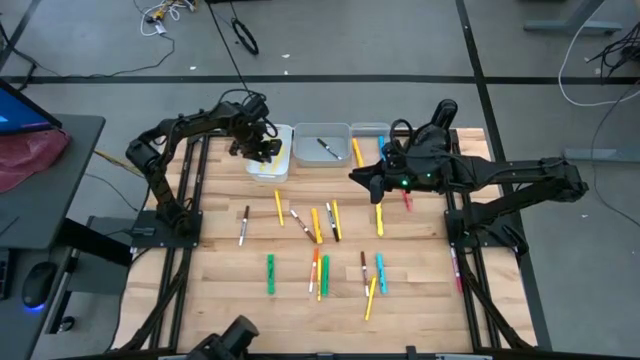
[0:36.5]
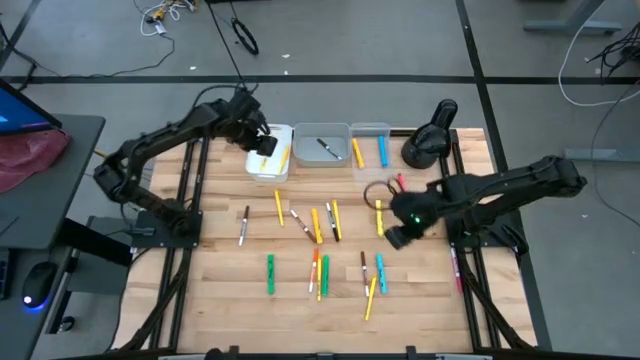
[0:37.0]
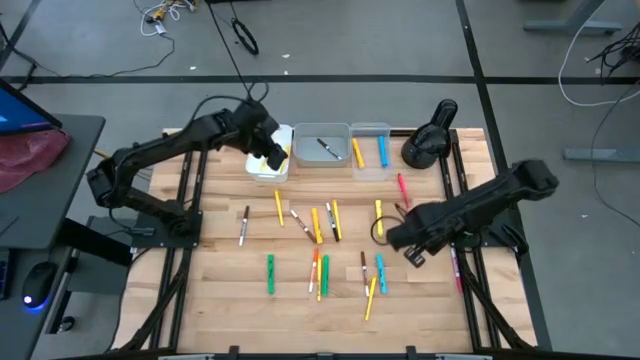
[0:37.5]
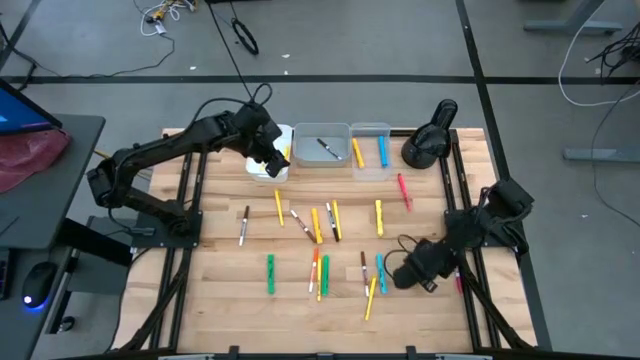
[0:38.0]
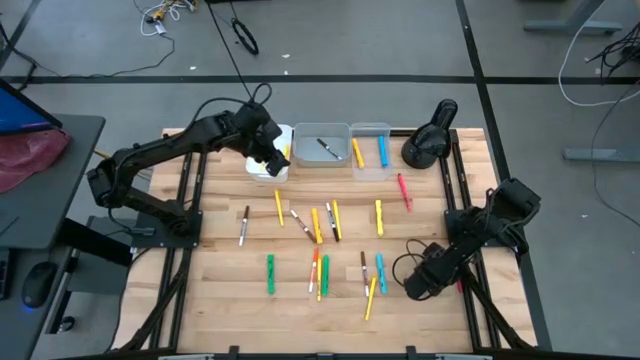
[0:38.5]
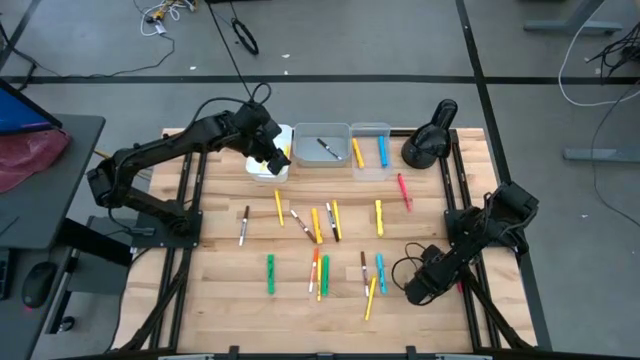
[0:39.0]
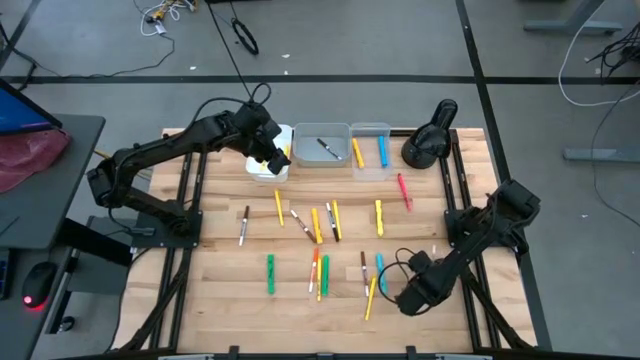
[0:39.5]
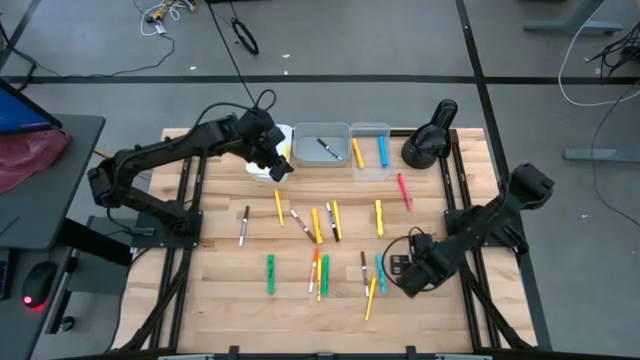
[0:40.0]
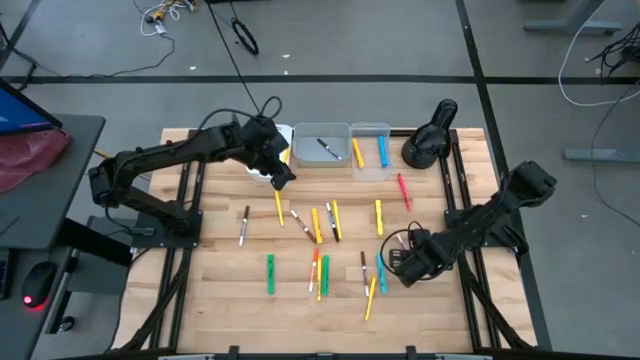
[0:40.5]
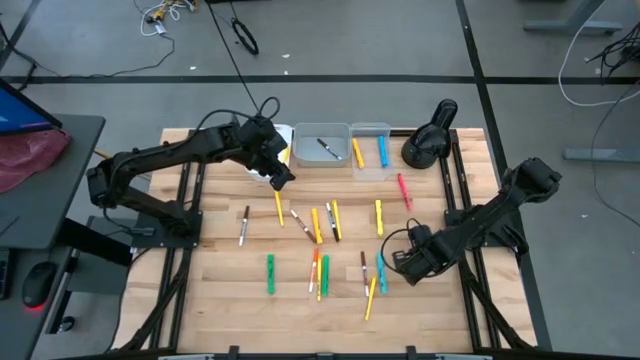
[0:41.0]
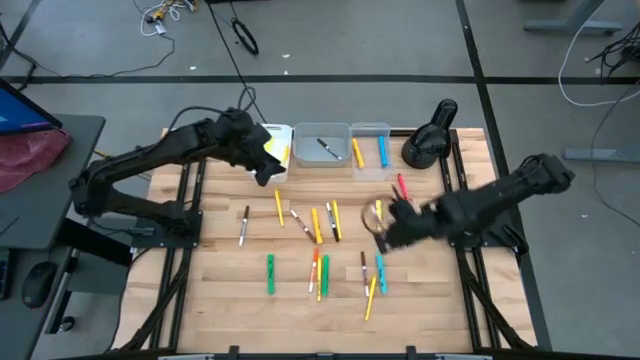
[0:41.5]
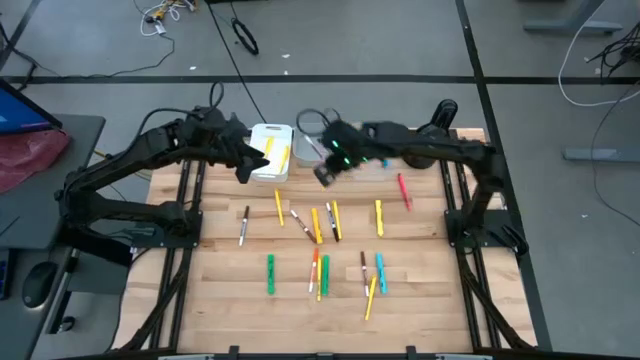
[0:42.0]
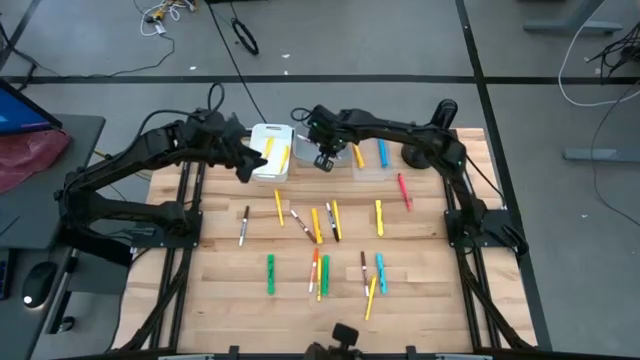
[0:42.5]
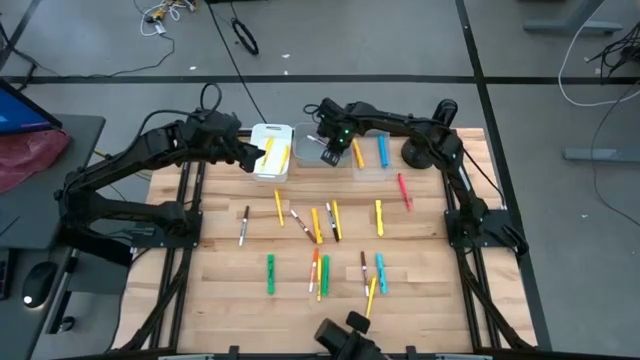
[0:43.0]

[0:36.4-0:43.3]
Task: Pick & Place Markers
Put the pink marker pen into the gray bin

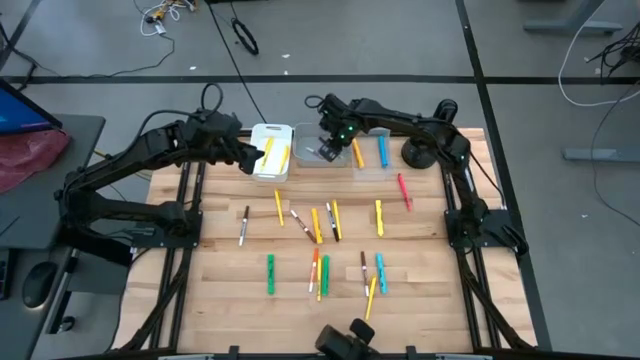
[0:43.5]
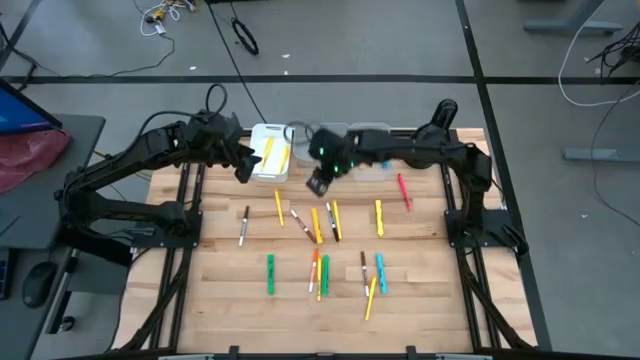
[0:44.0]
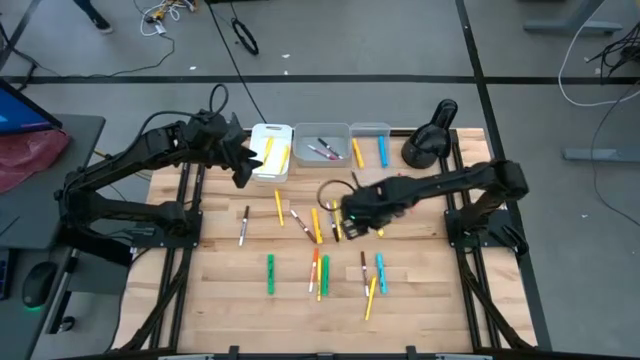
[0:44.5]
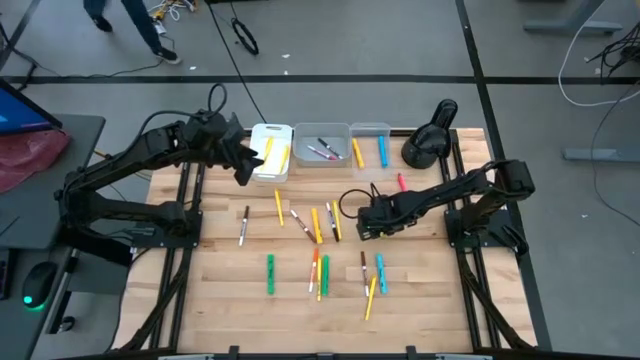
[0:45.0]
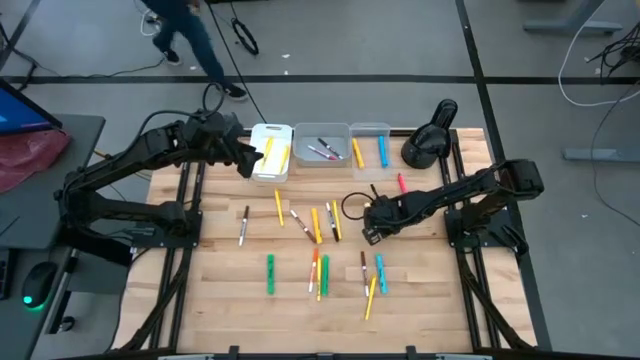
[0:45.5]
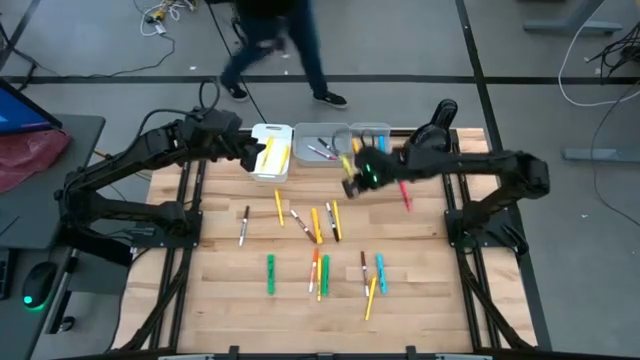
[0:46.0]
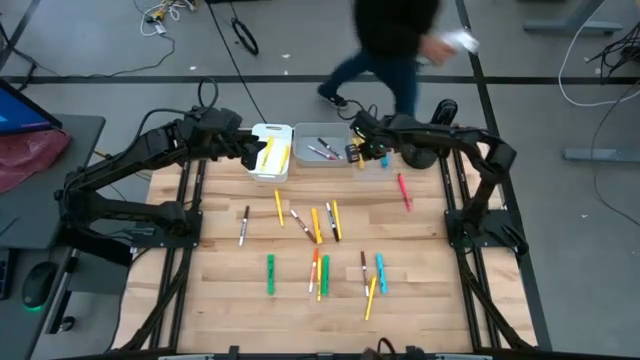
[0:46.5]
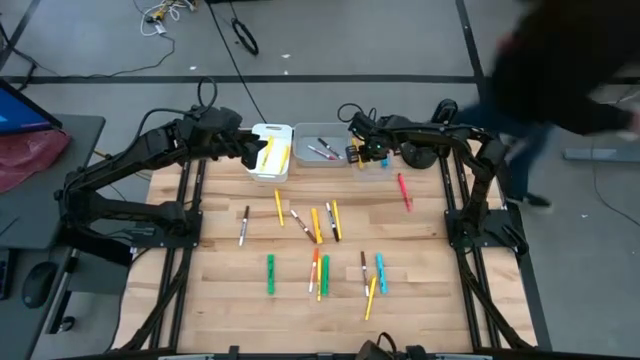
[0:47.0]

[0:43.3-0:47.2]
Put the light yellow highlighter pen into the transparent bin

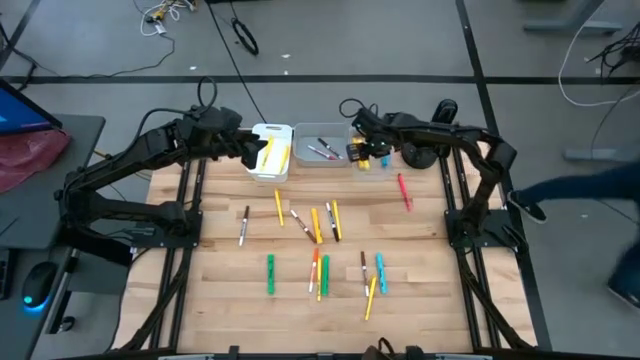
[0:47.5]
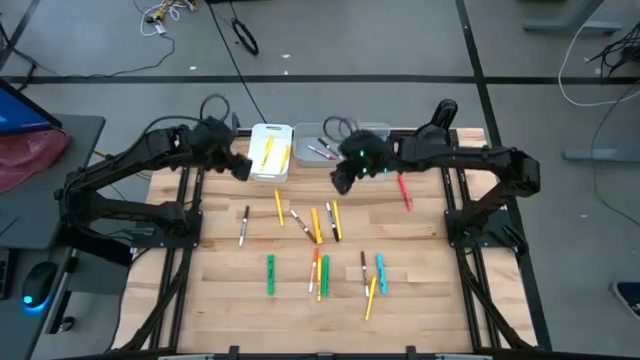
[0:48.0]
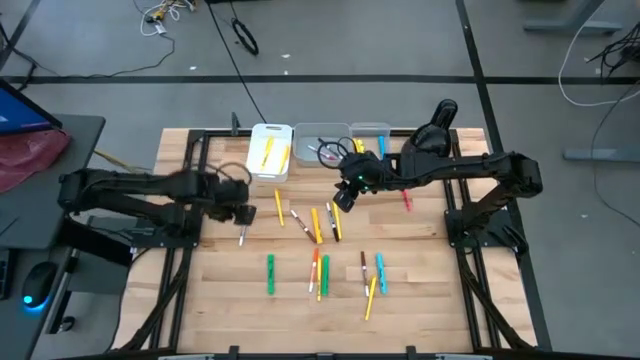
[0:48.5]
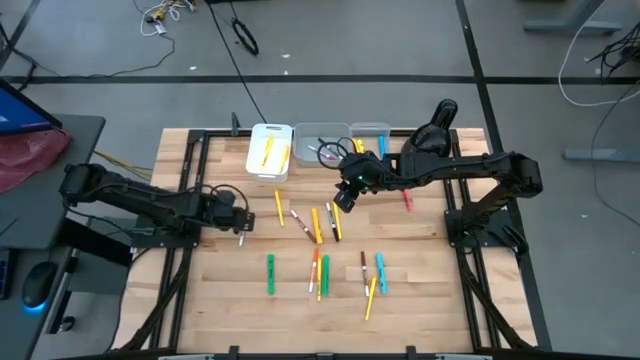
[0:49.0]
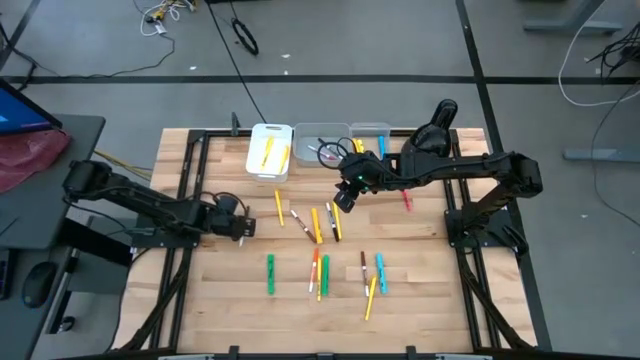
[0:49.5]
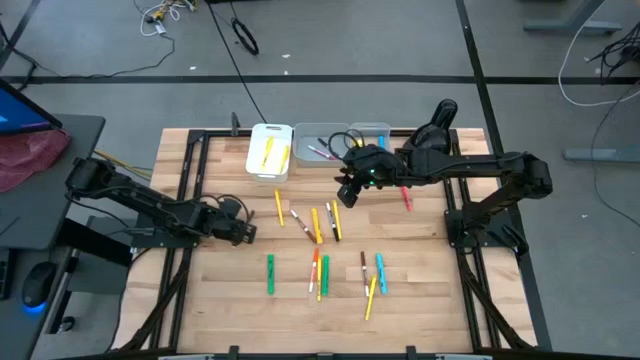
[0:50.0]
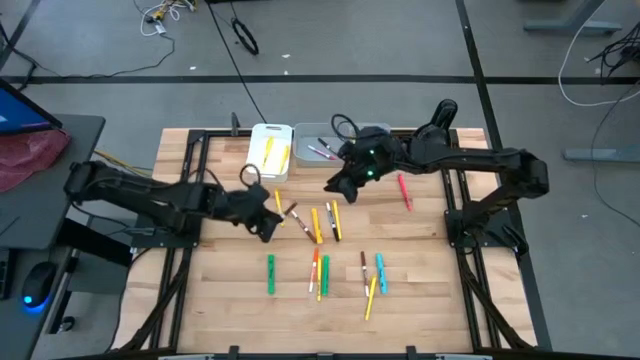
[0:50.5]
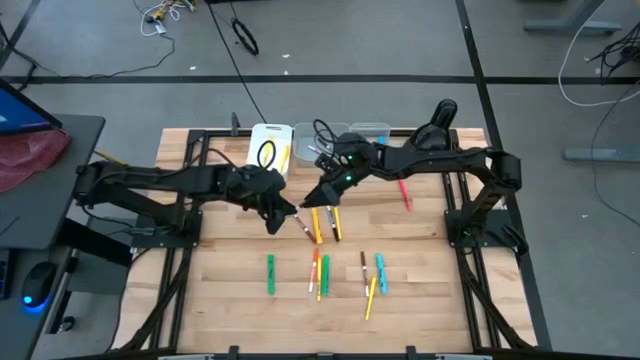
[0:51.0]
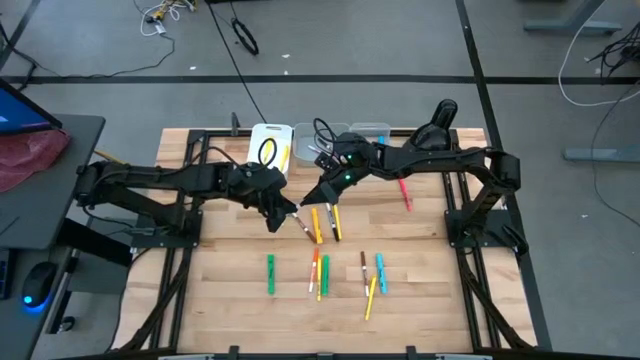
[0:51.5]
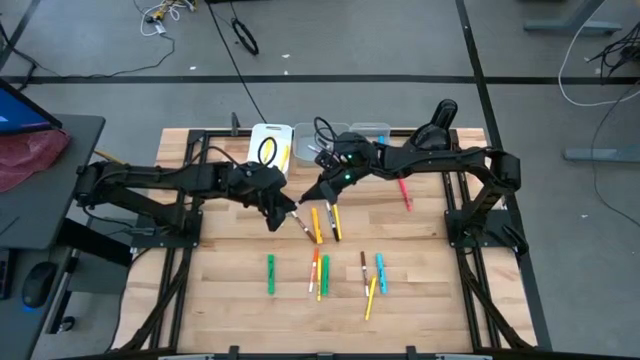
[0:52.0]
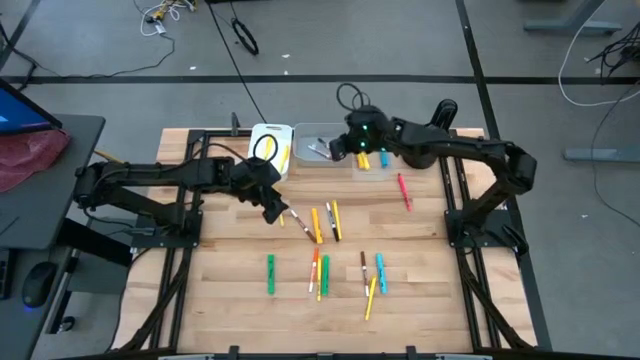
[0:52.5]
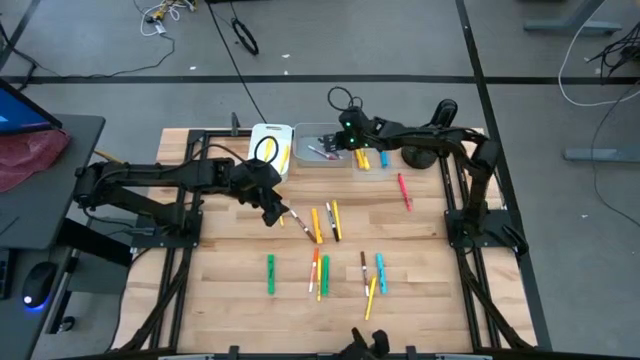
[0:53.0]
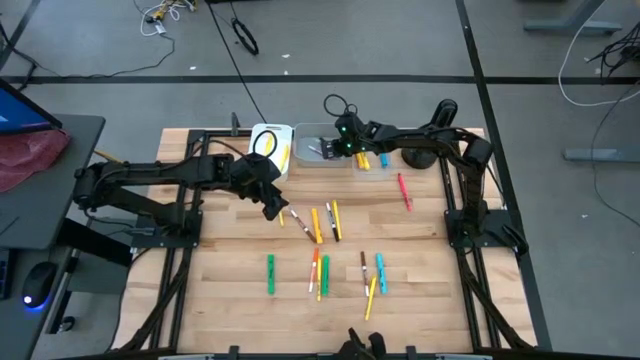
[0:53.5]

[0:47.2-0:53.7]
Put the brown marker pen into the gray bin

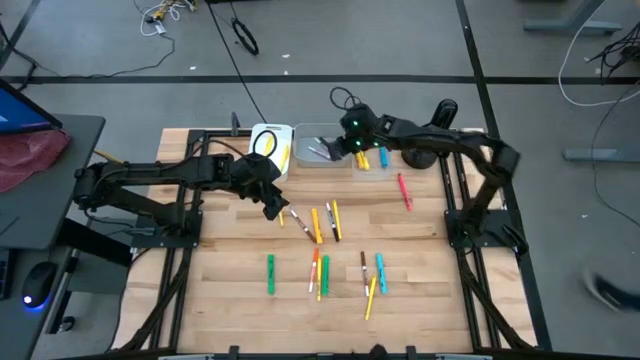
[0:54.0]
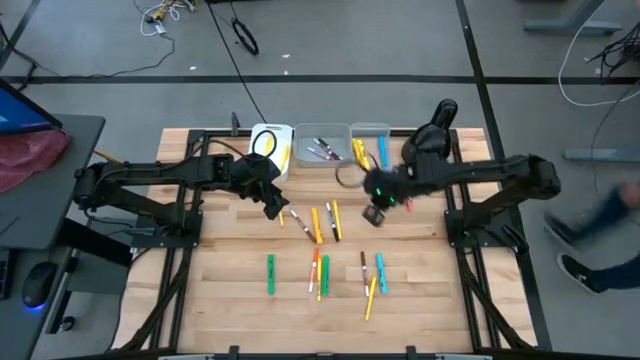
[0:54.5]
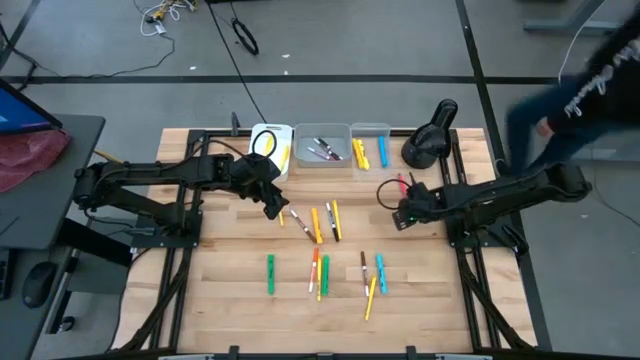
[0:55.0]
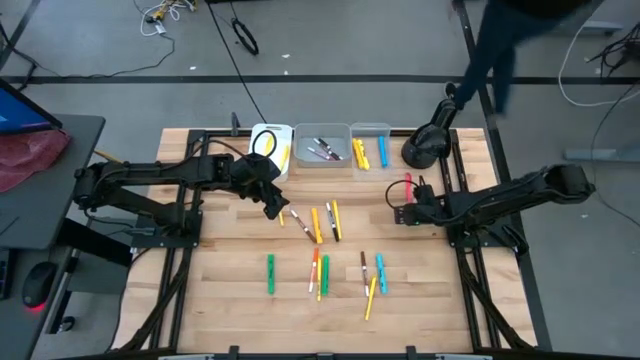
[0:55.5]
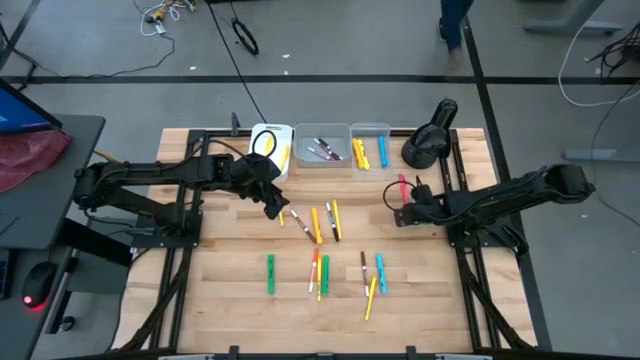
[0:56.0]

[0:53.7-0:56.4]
Put the pink pen into the white bin
